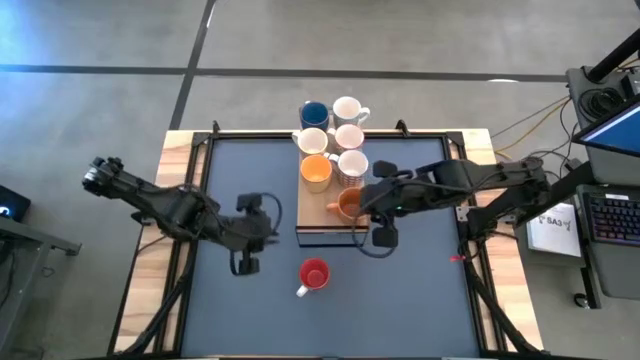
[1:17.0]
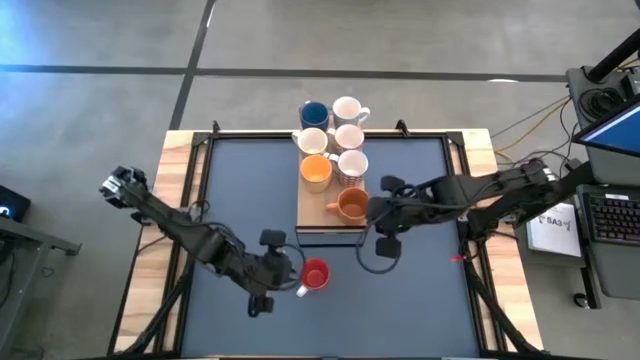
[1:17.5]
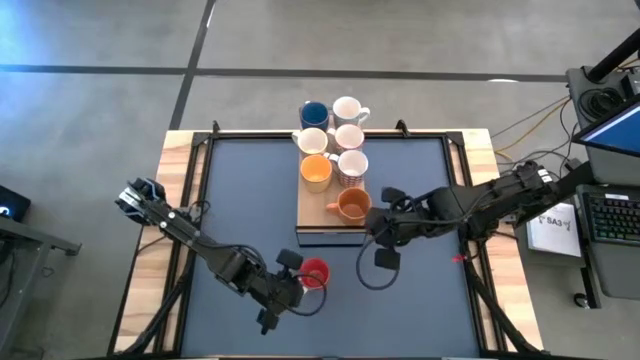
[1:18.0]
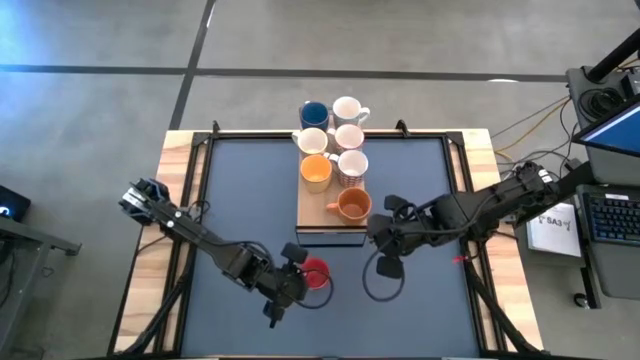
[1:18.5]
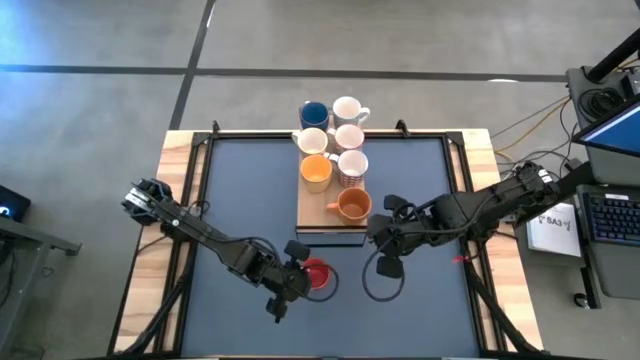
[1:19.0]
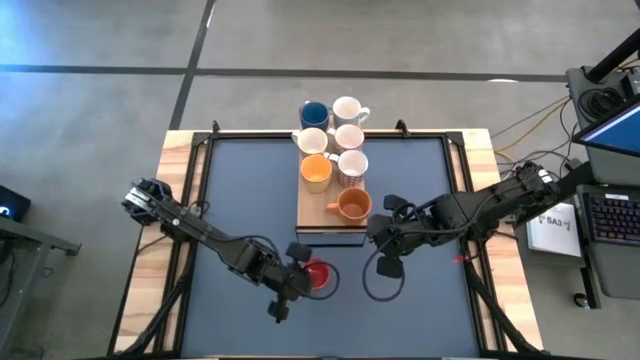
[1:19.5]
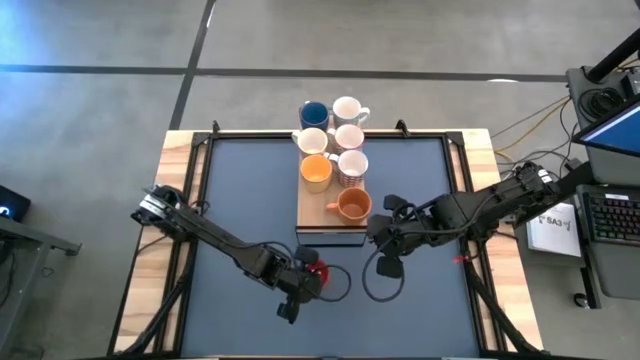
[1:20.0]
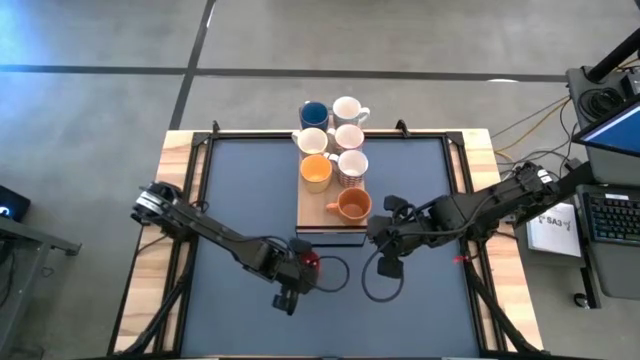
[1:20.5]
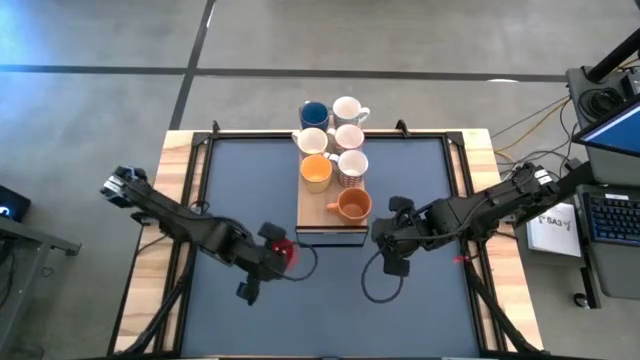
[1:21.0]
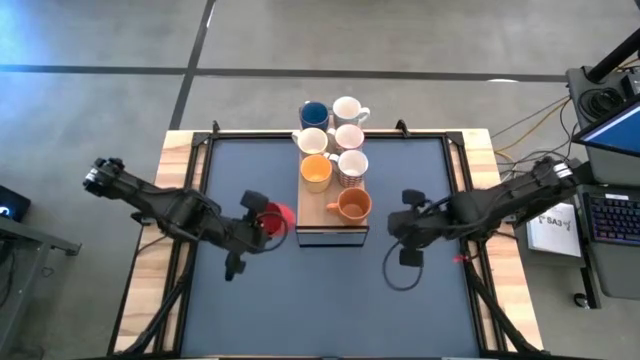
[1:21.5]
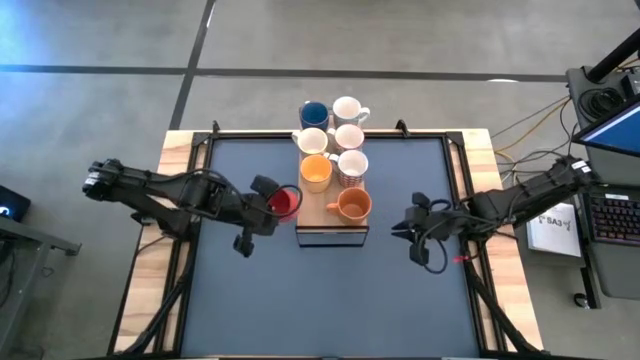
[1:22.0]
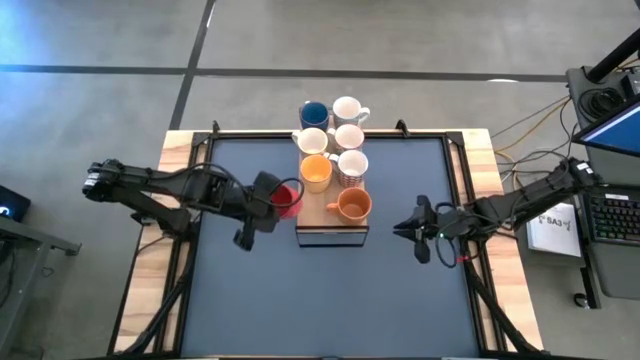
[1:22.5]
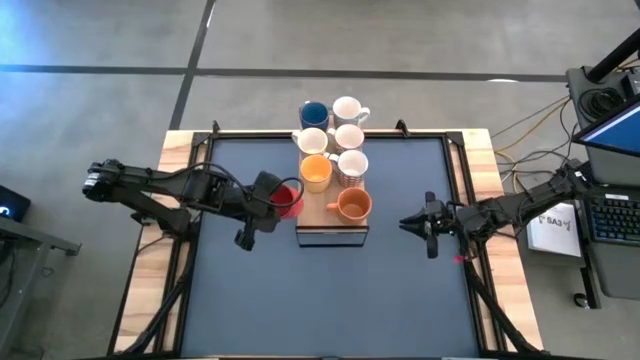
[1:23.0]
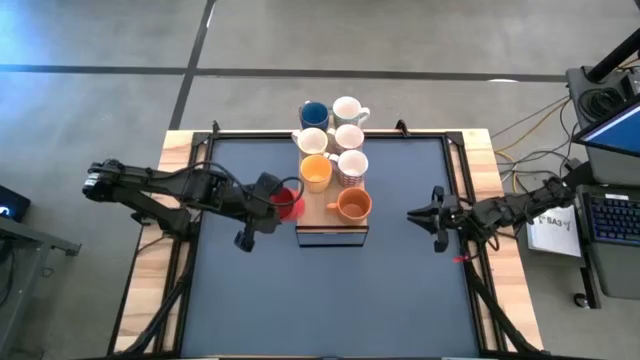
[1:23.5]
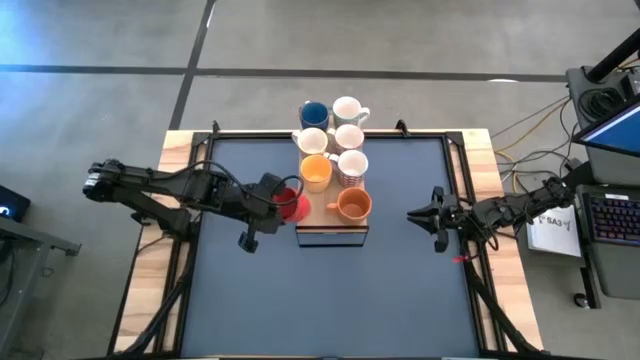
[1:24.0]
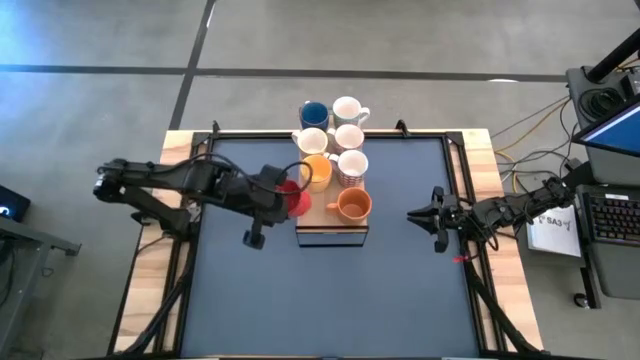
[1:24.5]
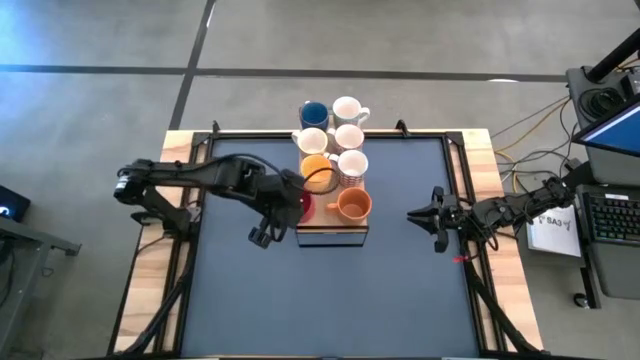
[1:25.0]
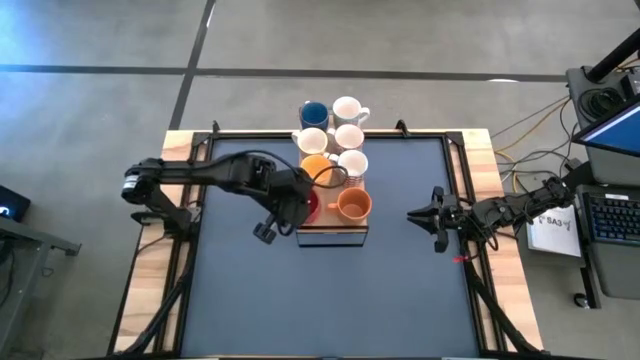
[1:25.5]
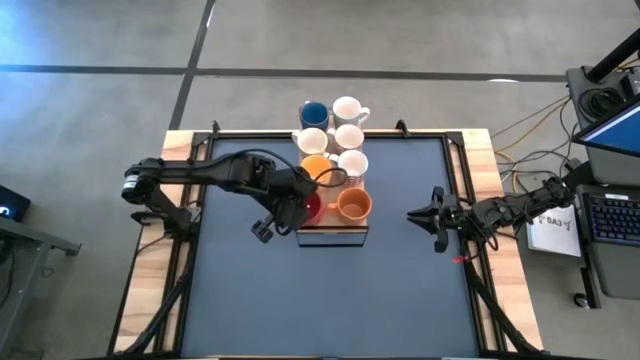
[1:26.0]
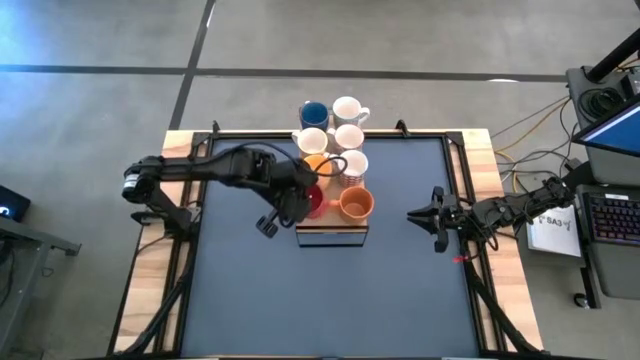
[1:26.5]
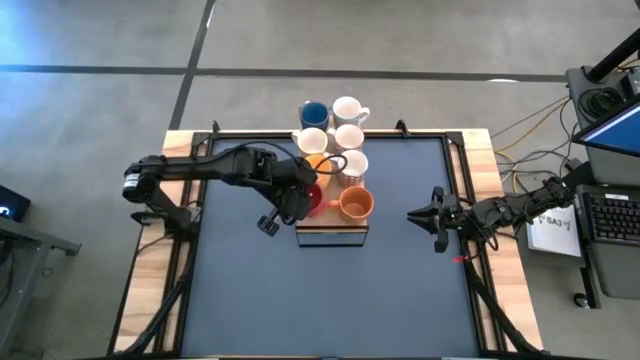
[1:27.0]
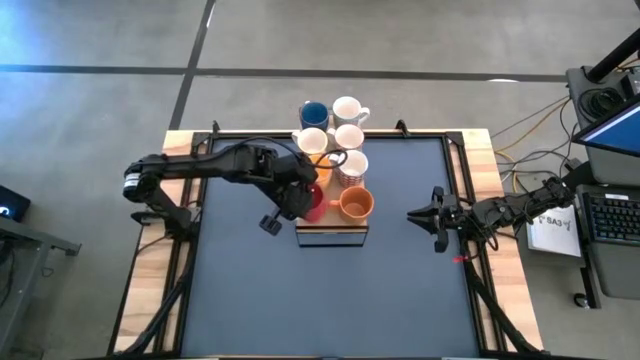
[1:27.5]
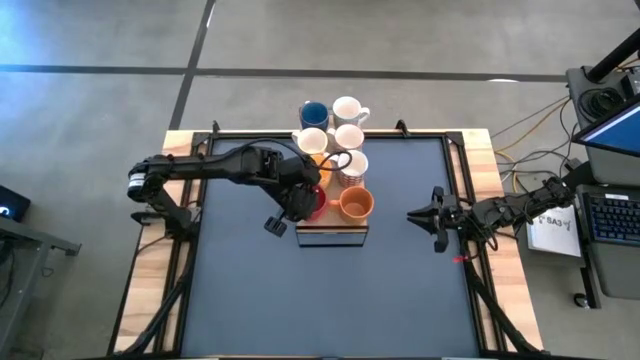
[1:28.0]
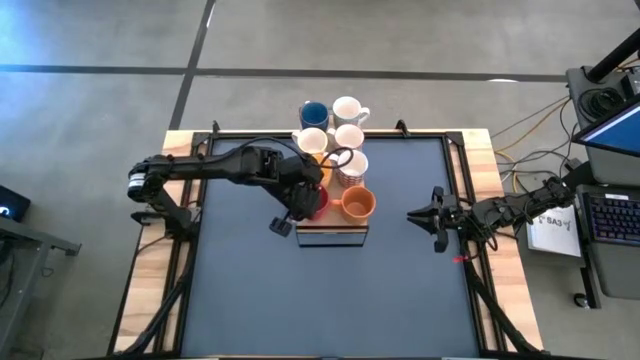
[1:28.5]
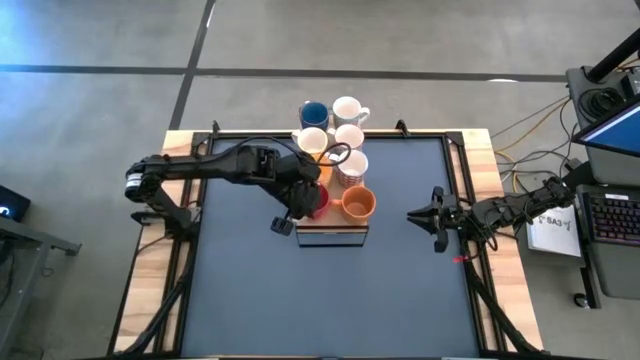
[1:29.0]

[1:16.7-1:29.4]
Task: Place coffee mugs
Put the red mug on the shelf

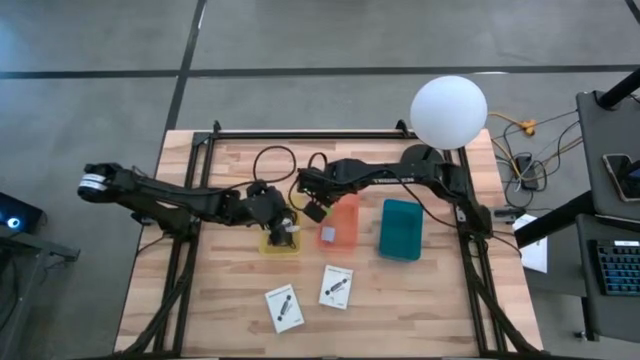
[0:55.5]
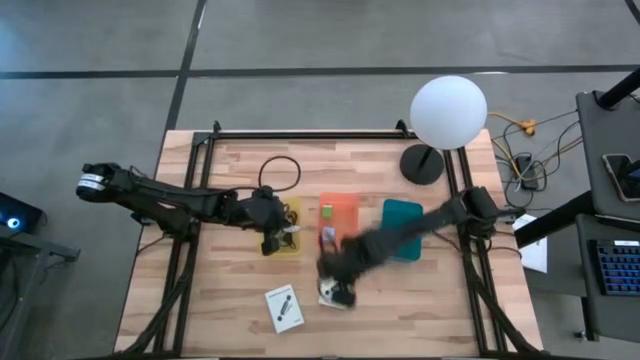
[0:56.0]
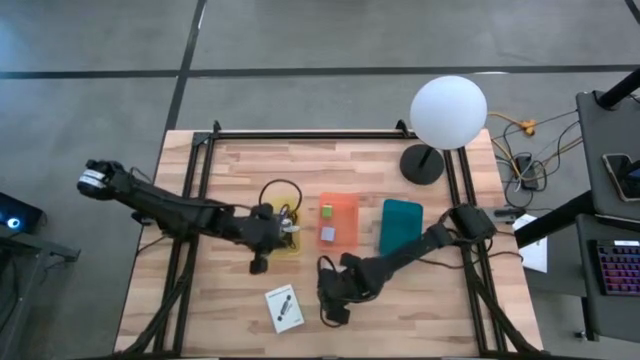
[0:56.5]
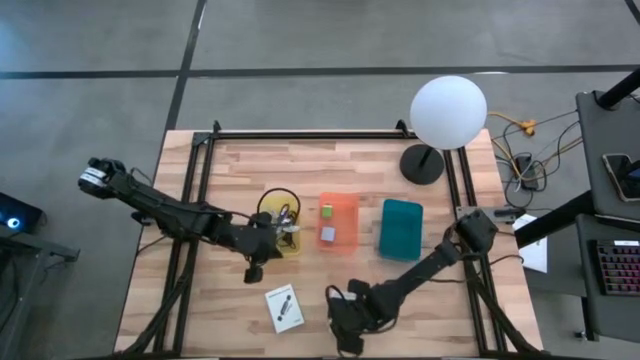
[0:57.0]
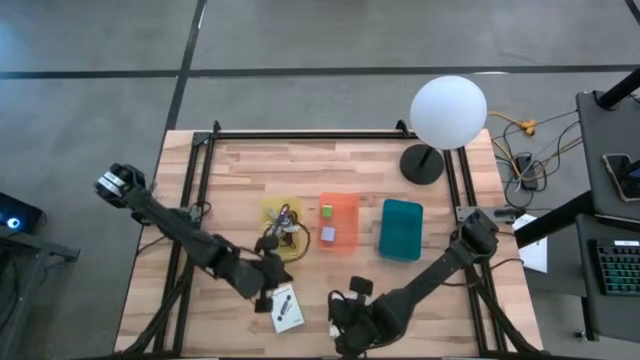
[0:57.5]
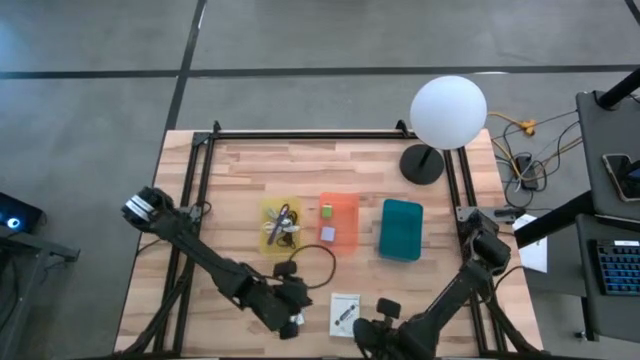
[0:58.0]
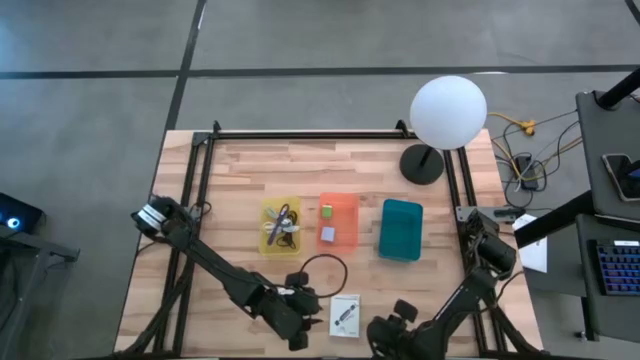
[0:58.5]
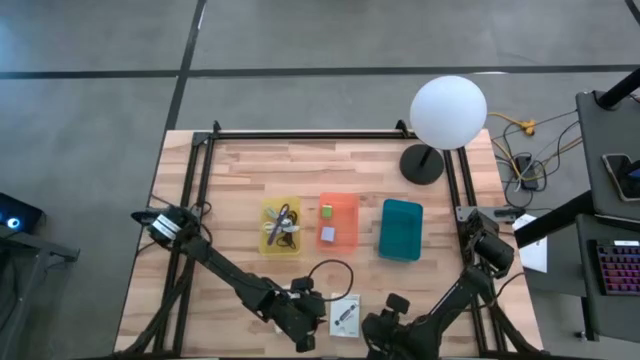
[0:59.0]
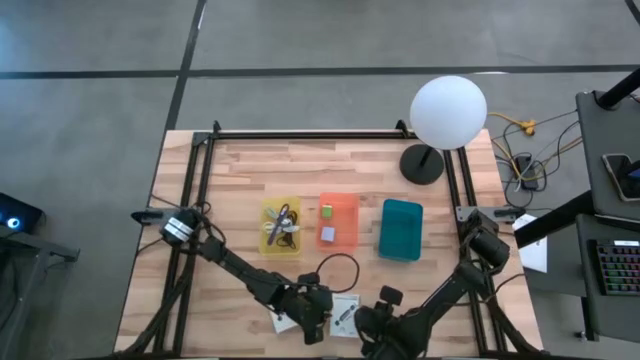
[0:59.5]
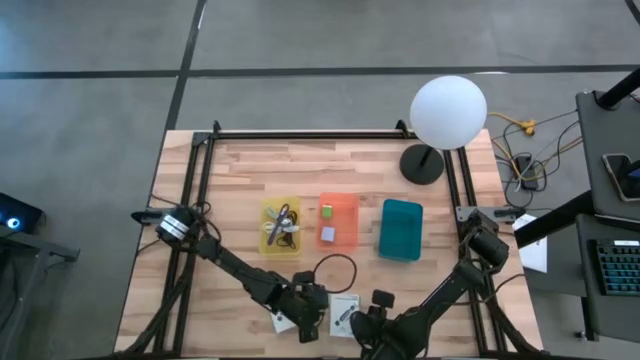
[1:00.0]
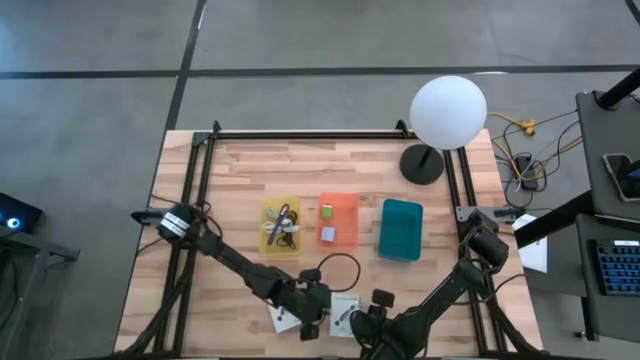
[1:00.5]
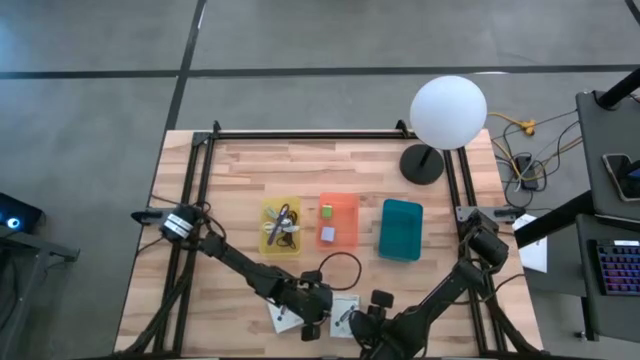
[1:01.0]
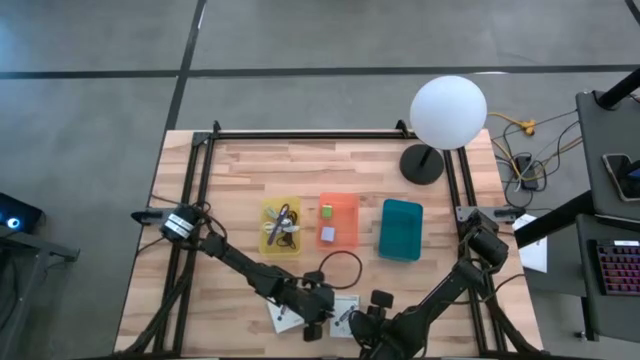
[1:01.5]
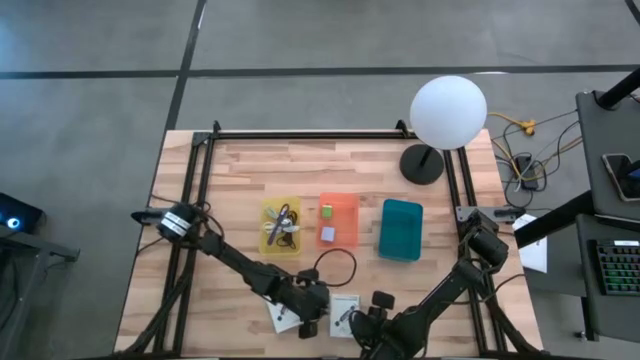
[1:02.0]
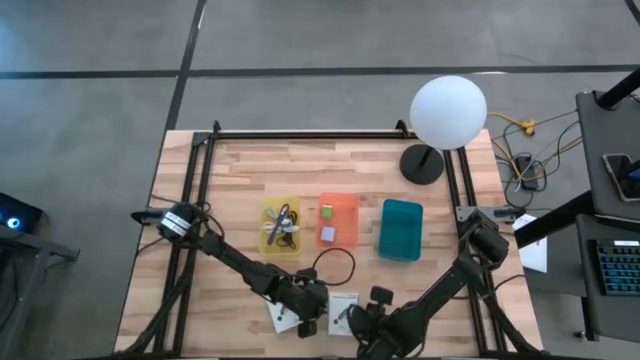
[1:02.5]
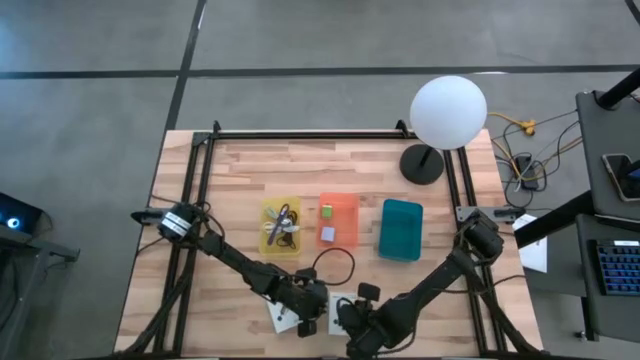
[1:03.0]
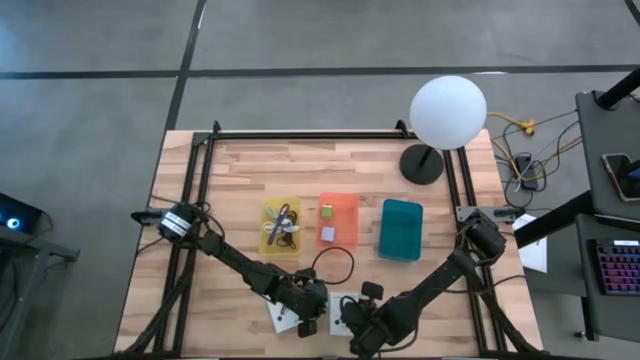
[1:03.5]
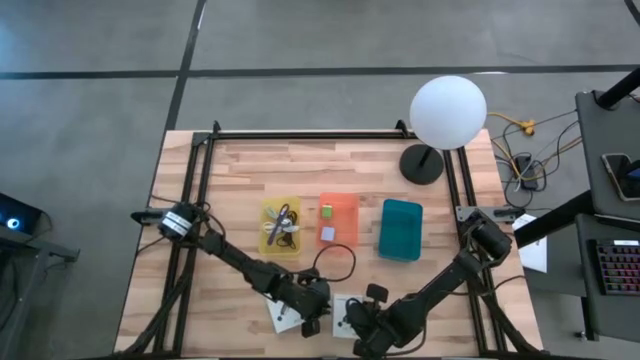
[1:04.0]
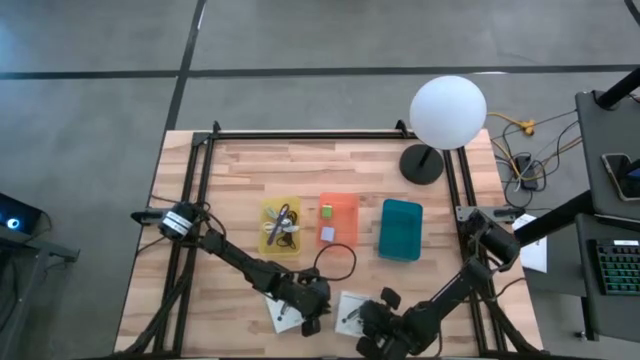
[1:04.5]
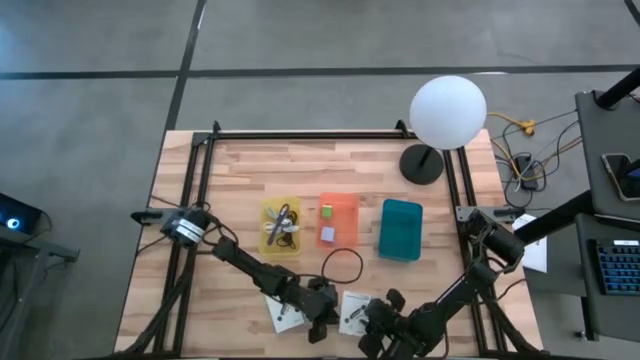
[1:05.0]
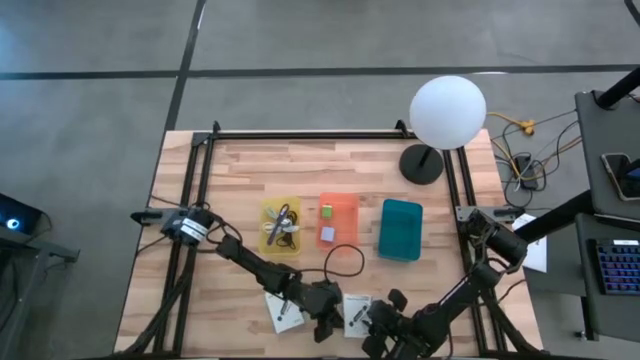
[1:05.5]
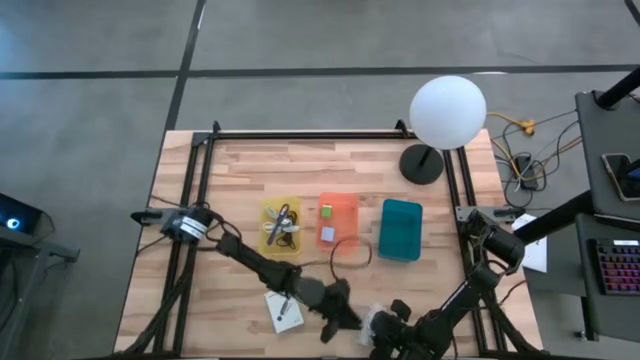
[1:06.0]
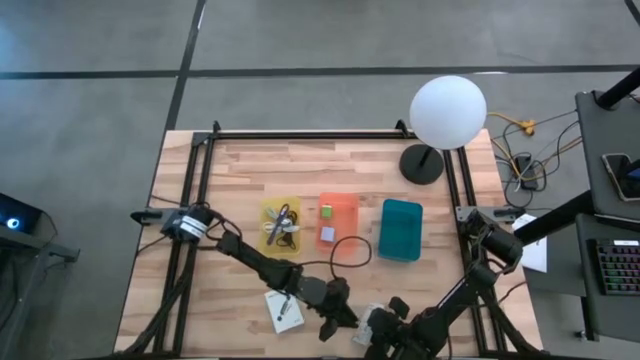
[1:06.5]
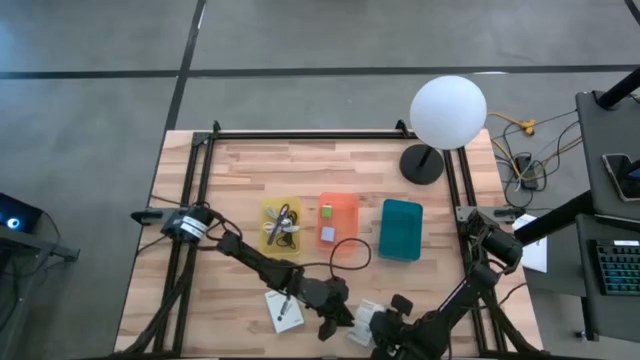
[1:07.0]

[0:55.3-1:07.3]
Task: Pick and place items into bin
Put the right white card reader box into the blue bin
